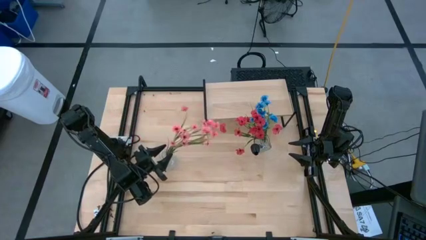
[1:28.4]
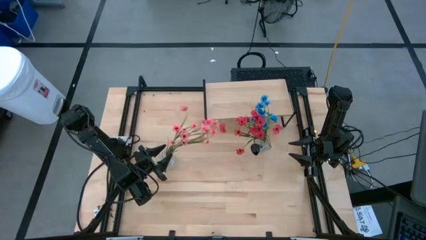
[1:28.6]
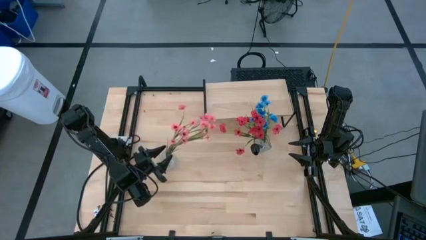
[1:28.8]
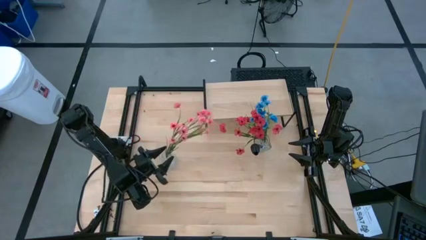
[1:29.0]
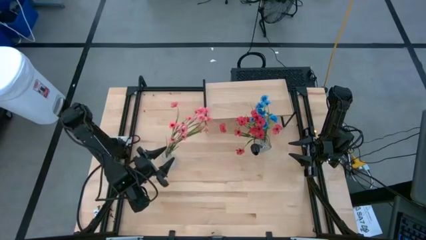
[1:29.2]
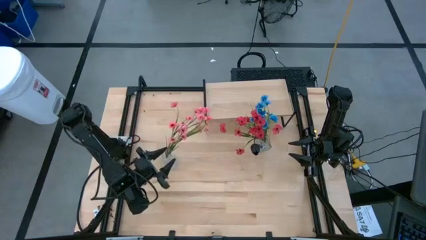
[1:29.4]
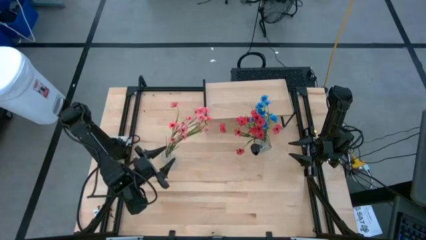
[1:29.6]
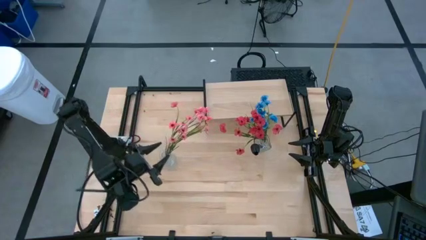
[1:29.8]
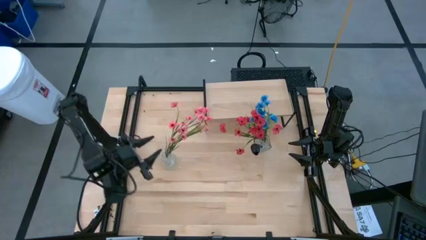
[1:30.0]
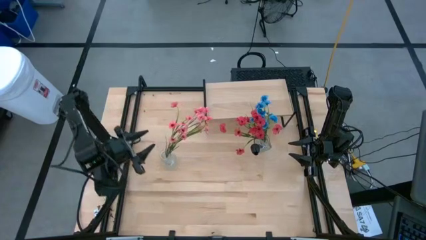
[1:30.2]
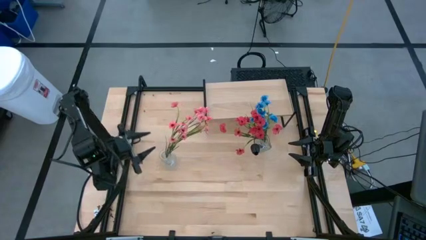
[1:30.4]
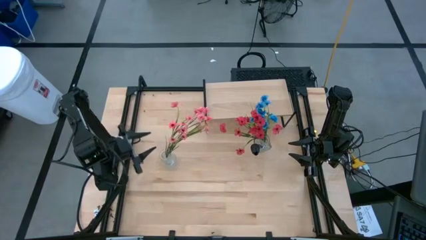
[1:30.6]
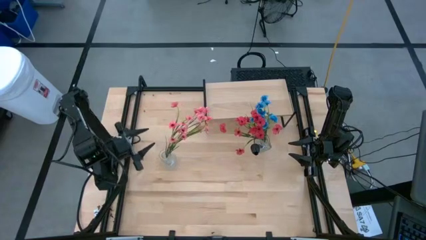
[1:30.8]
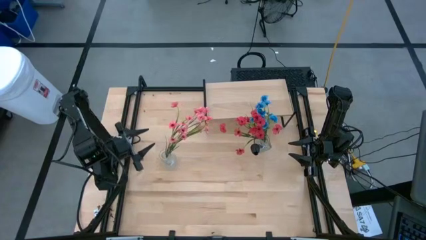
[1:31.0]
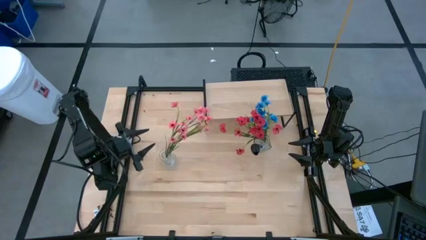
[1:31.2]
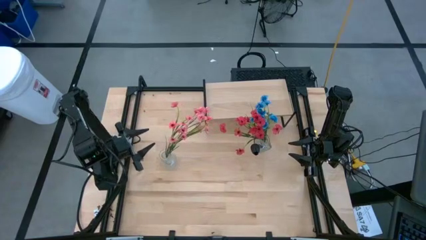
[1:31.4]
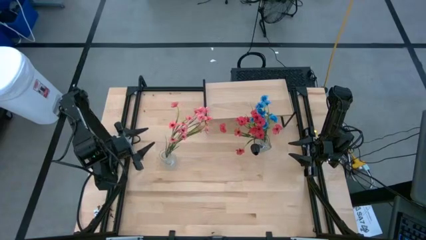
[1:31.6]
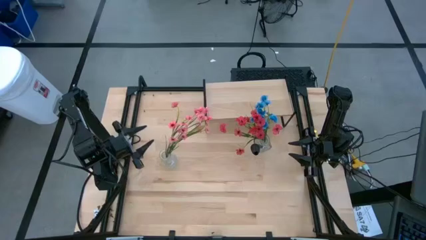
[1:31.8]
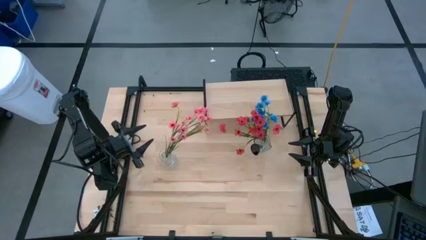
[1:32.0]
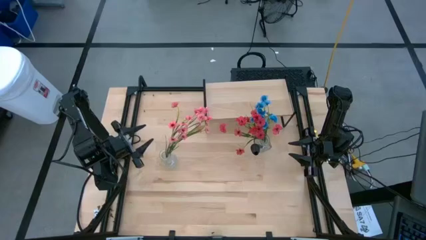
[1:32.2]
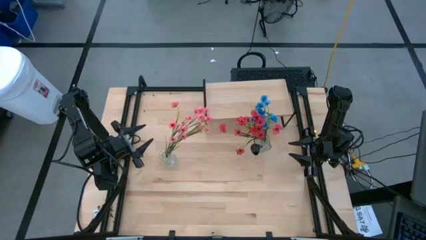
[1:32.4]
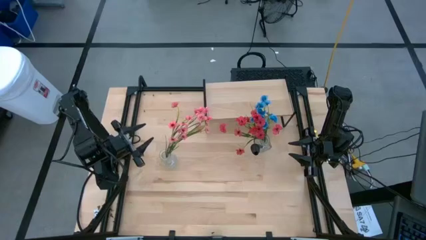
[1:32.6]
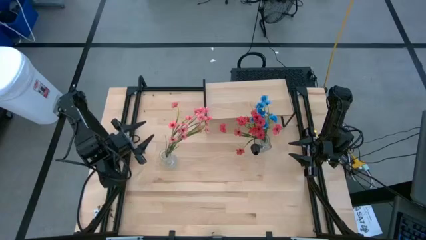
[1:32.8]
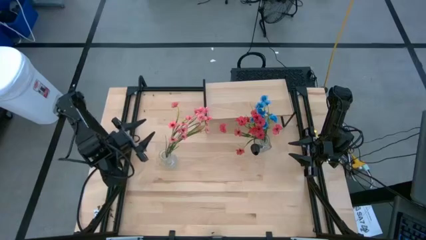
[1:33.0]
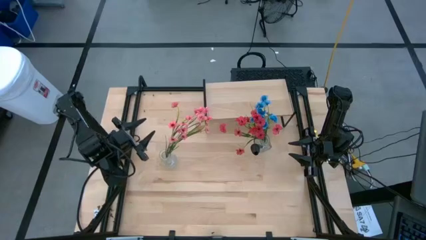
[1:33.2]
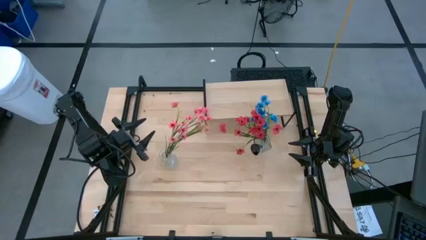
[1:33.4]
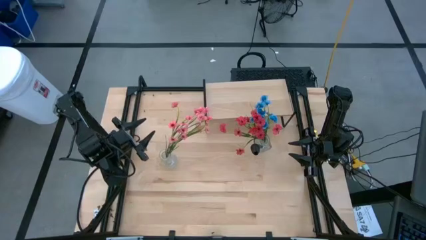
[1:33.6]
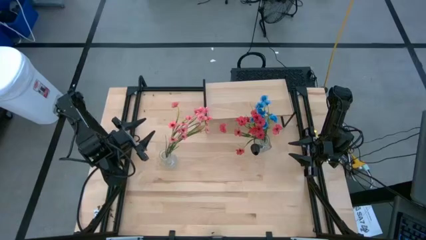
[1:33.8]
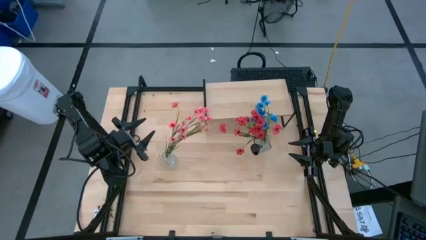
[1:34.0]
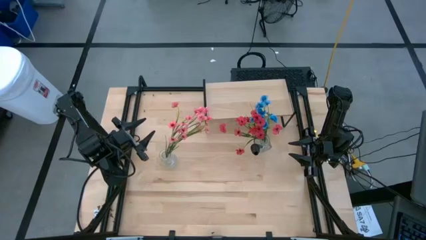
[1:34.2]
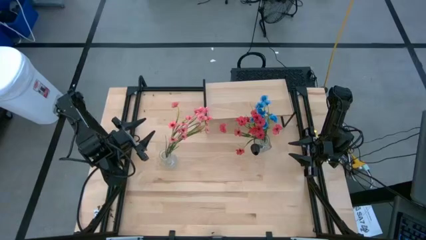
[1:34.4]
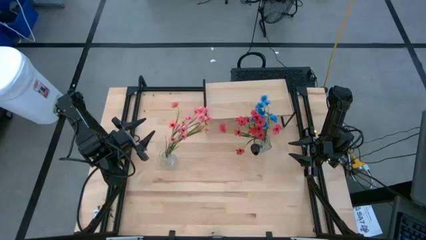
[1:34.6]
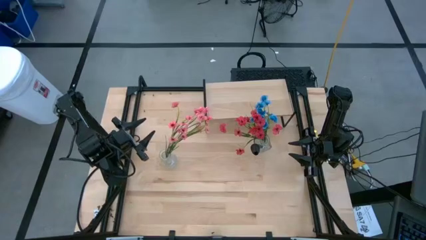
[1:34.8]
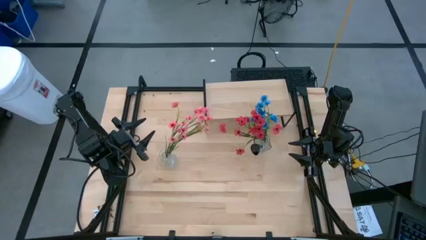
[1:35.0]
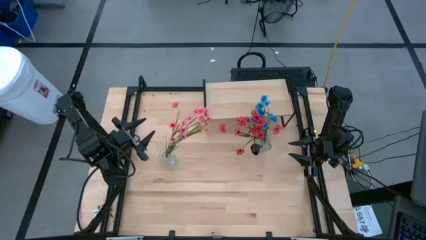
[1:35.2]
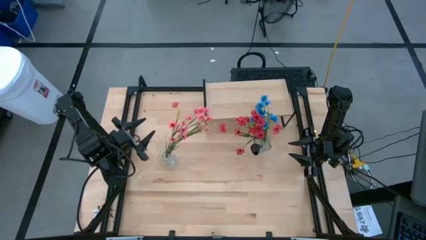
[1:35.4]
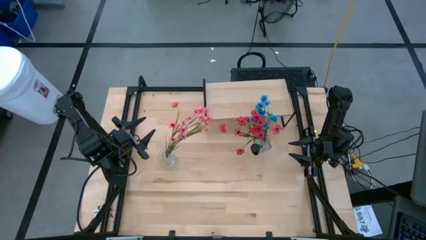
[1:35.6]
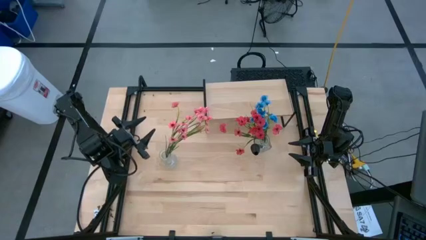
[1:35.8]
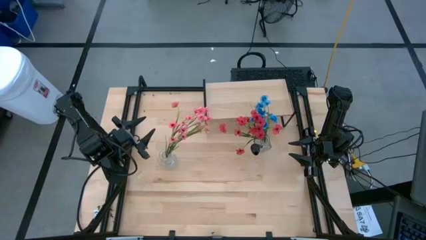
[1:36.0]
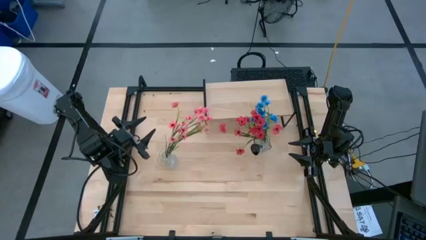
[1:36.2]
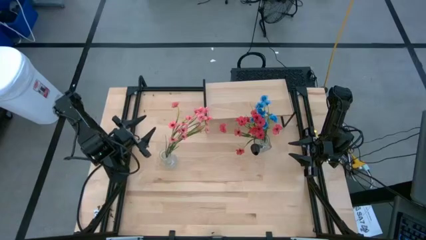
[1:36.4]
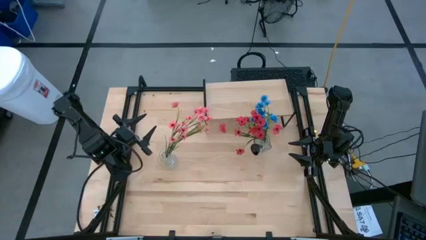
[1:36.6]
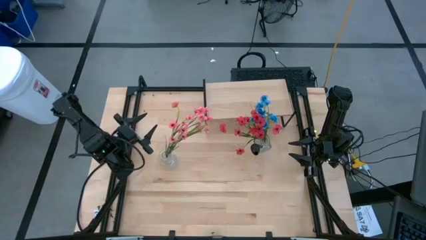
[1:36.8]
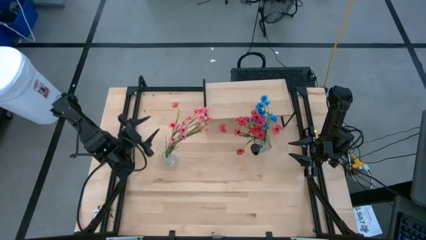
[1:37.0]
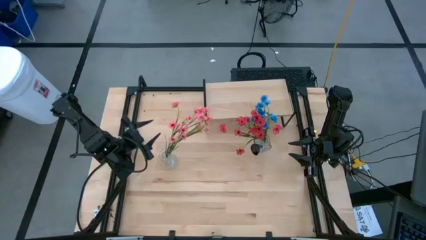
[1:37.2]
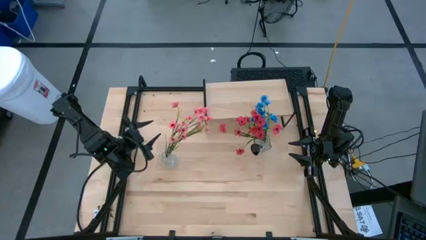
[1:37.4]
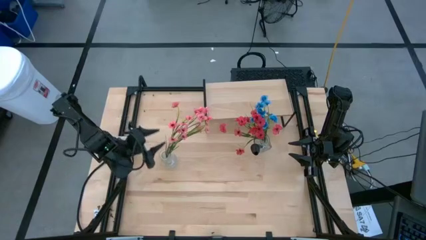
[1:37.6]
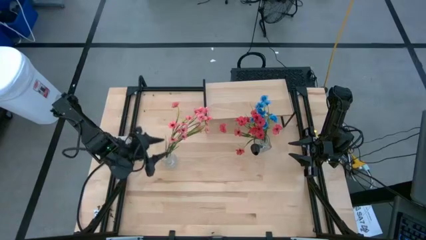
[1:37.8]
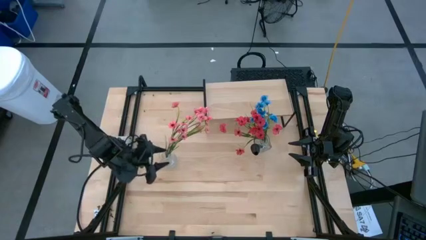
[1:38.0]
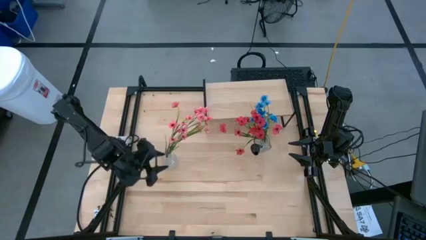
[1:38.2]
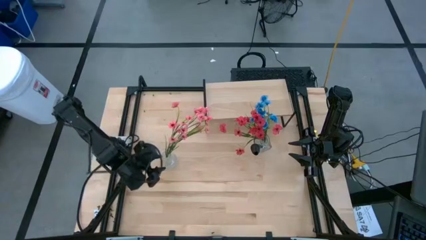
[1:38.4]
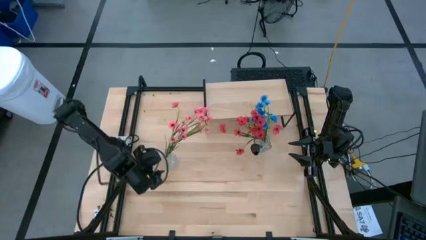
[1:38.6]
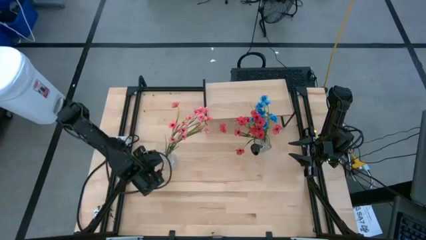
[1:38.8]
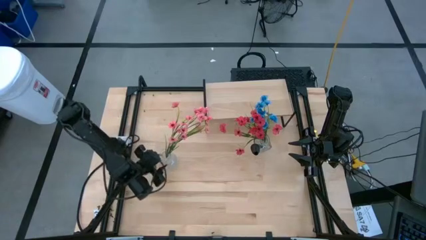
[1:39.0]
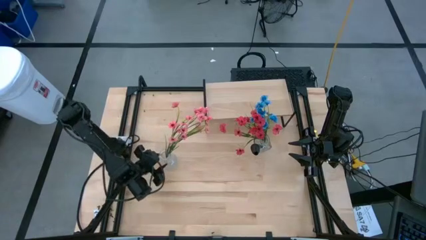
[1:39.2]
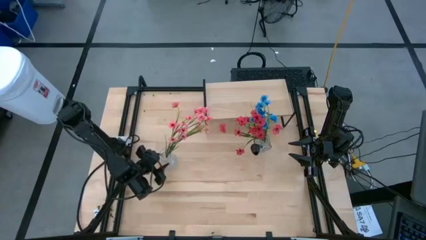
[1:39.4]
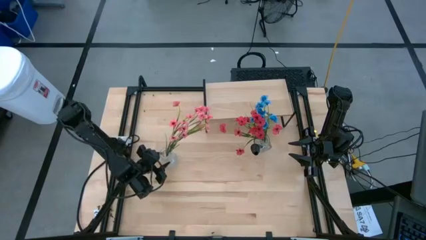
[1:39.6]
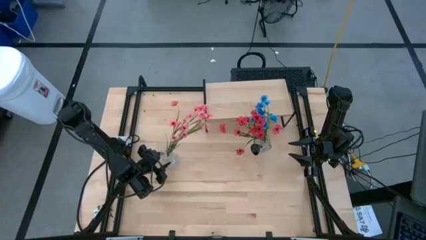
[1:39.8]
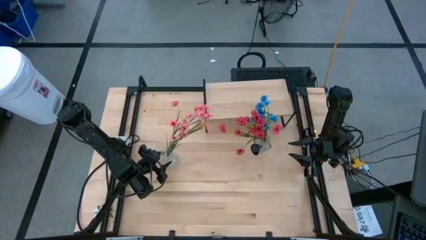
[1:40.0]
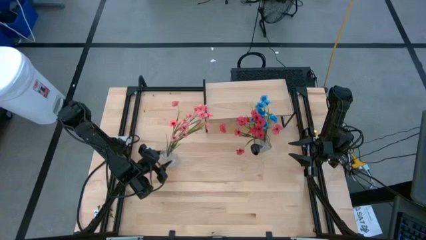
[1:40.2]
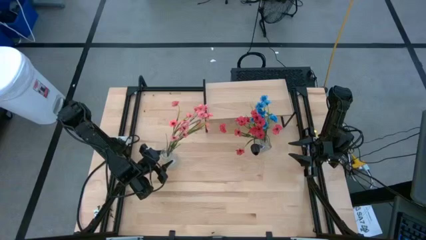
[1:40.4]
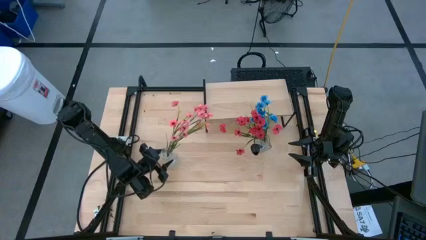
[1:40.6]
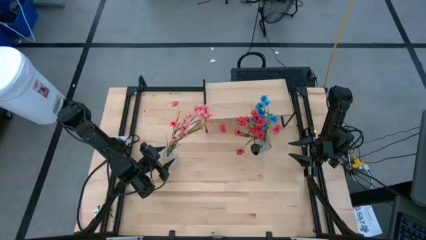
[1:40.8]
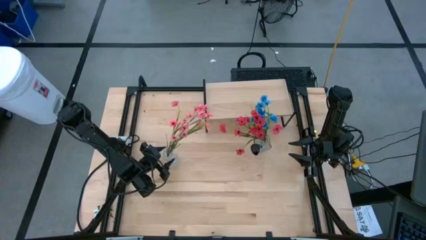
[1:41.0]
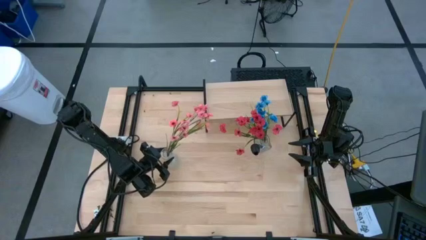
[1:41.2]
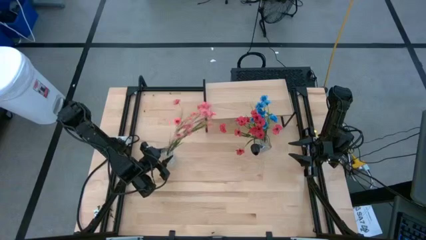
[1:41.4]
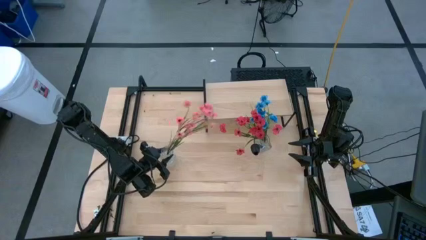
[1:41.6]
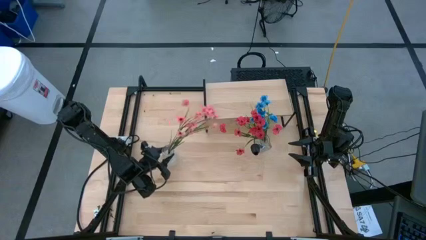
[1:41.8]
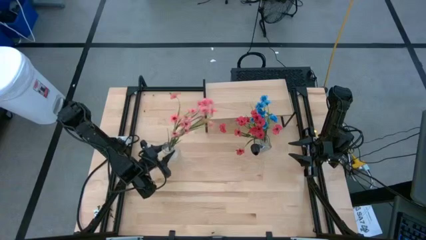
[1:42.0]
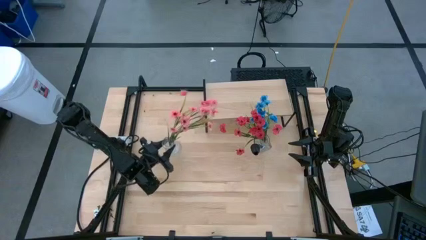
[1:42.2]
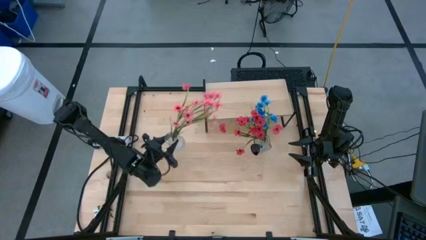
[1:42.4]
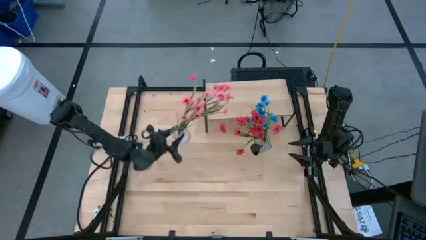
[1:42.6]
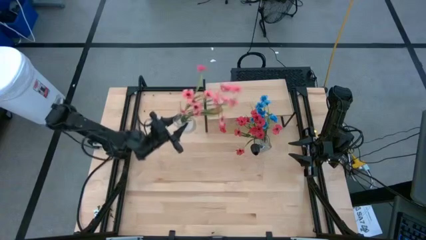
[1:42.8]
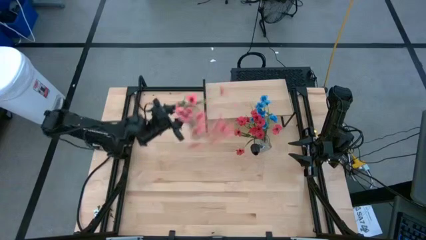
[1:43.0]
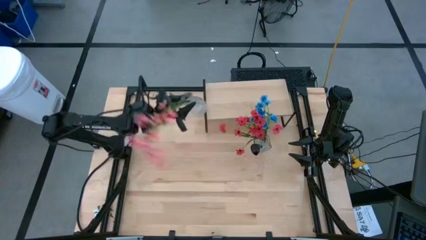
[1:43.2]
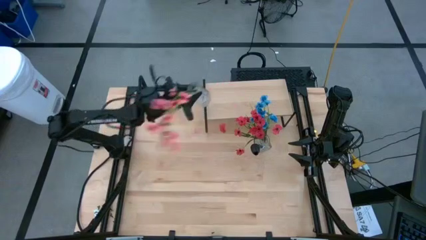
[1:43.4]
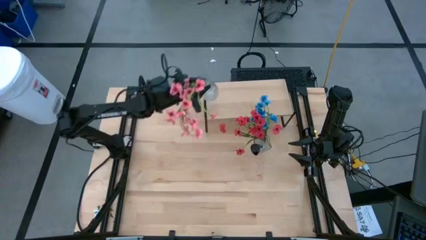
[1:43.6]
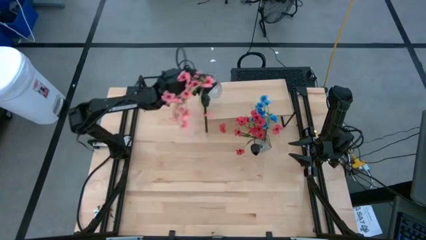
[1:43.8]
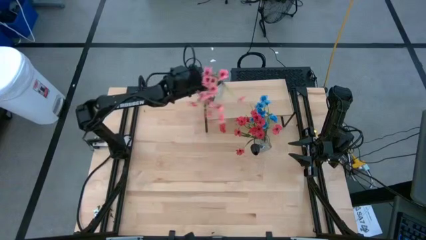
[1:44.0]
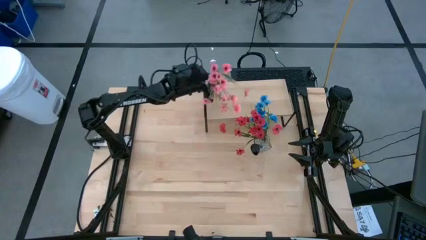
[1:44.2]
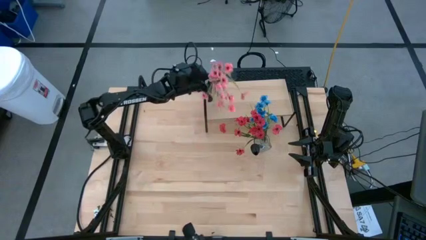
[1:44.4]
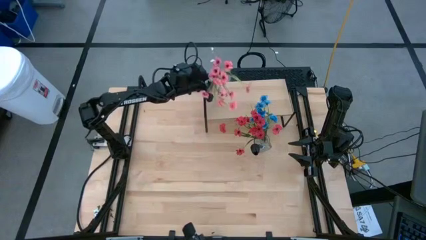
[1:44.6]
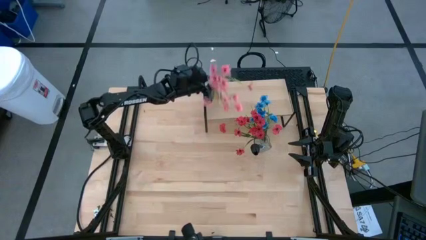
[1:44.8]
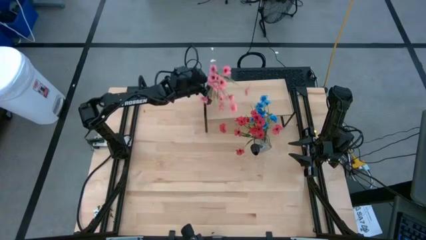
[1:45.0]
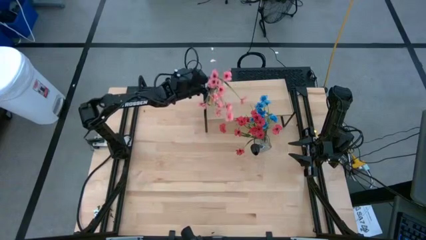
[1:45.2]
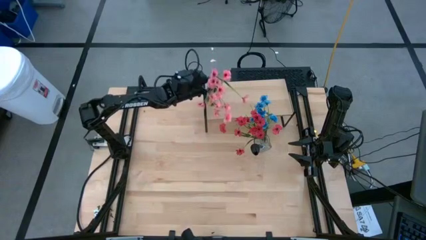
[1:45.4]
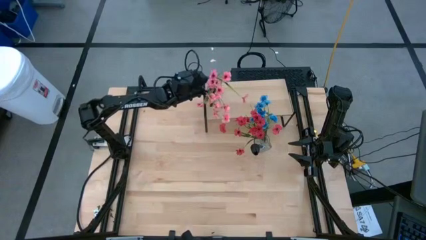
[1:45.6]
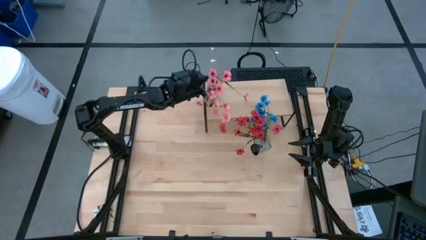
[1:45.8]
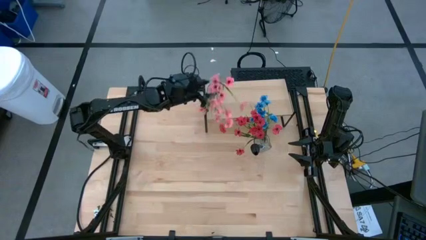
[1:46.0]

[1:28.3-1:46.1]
Task: Pick and place flowers into a vace then onto a shelf
Put the left transparent flower vase on the shelf
